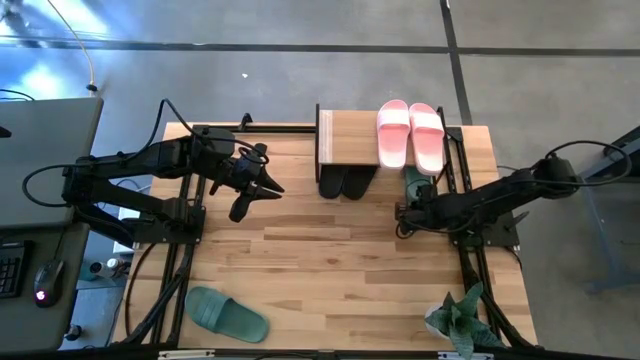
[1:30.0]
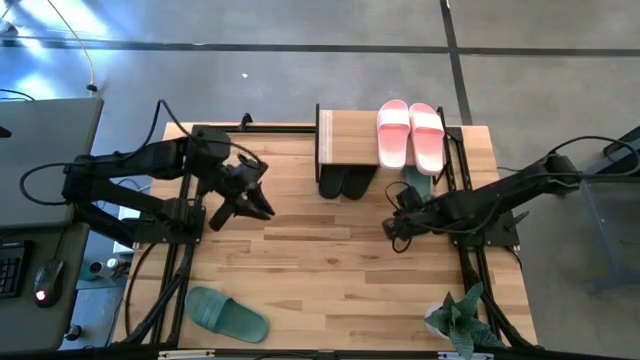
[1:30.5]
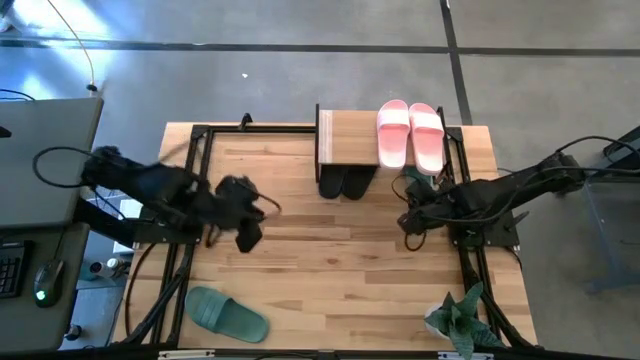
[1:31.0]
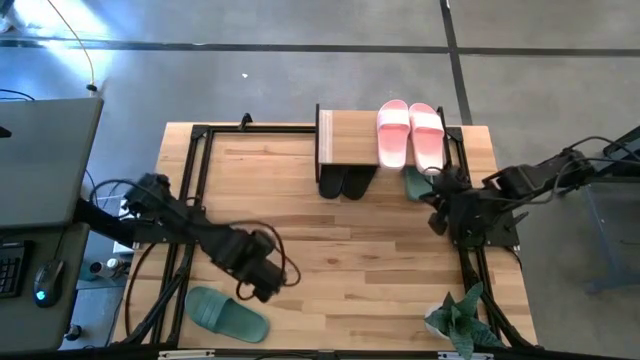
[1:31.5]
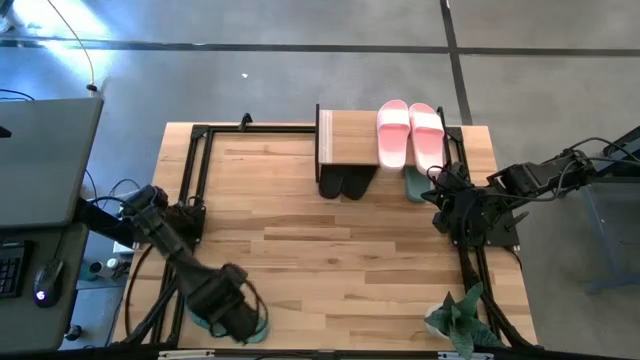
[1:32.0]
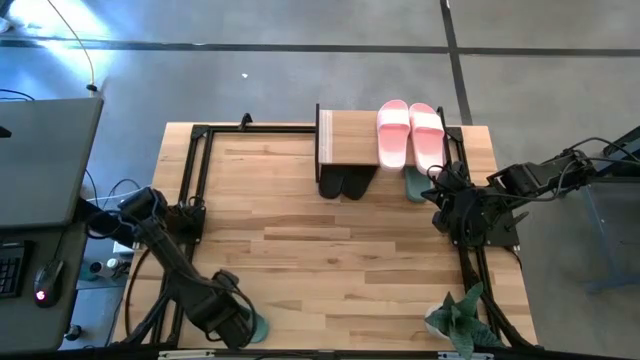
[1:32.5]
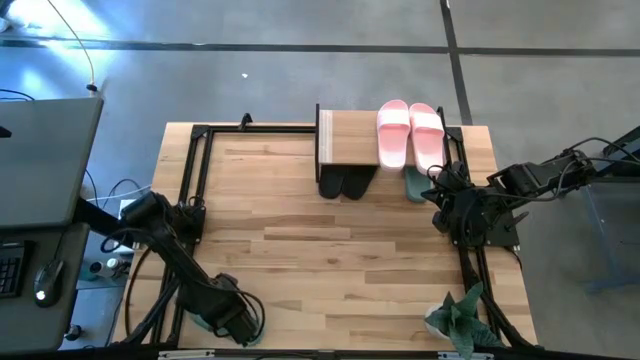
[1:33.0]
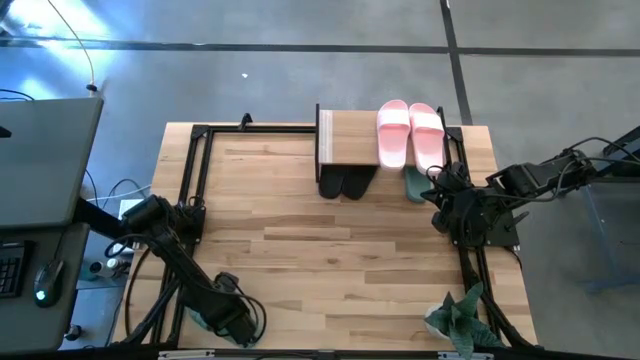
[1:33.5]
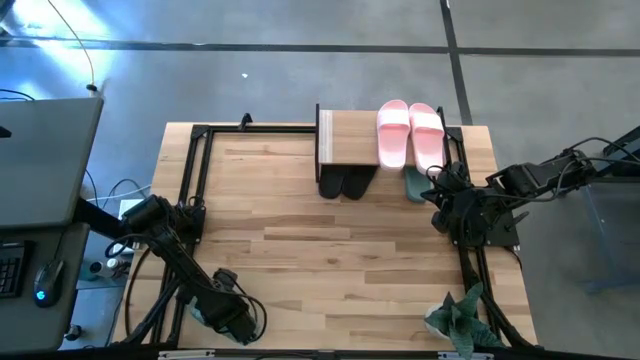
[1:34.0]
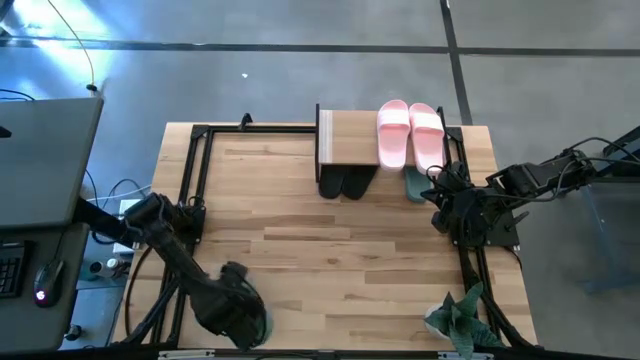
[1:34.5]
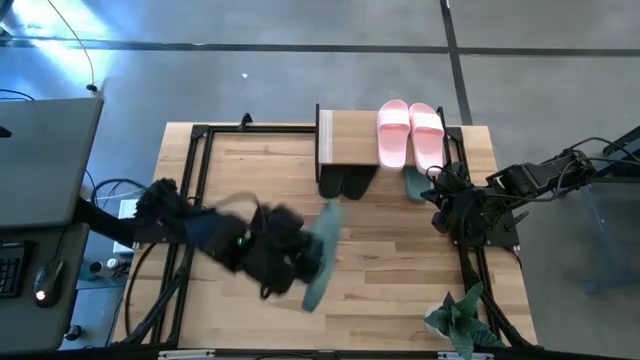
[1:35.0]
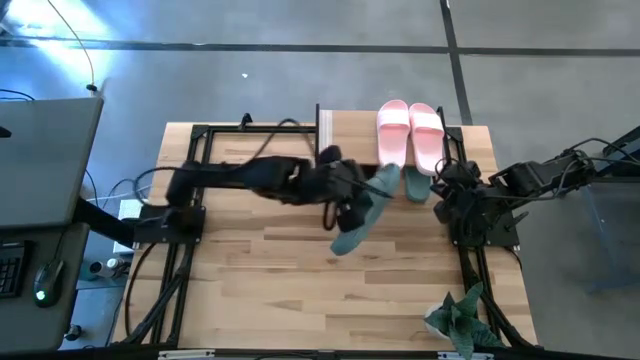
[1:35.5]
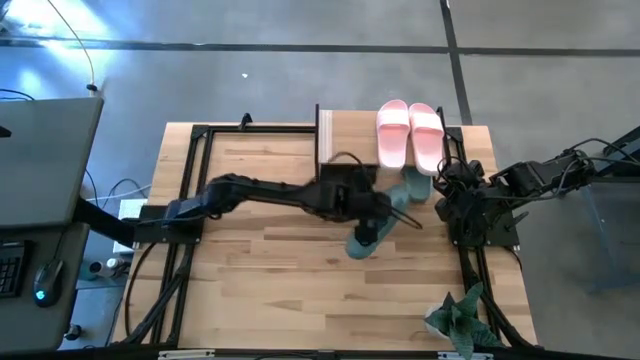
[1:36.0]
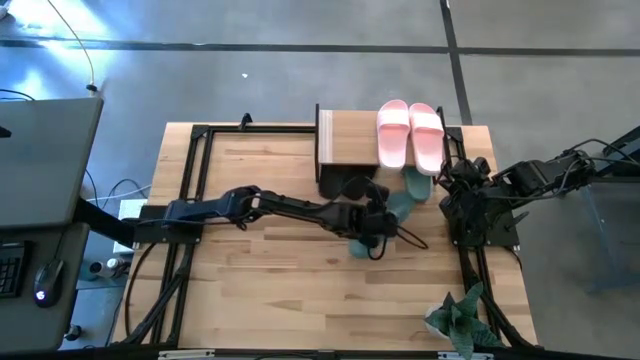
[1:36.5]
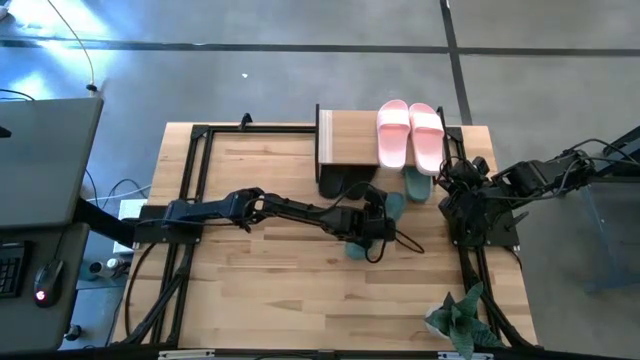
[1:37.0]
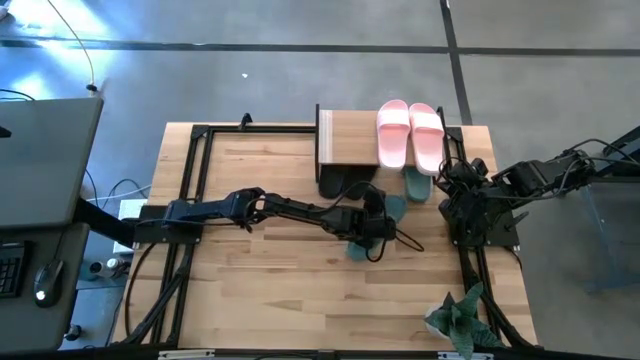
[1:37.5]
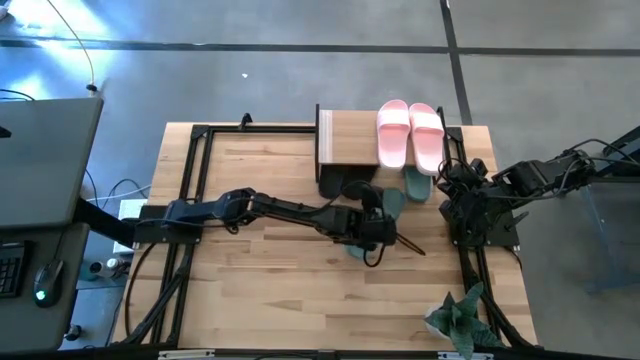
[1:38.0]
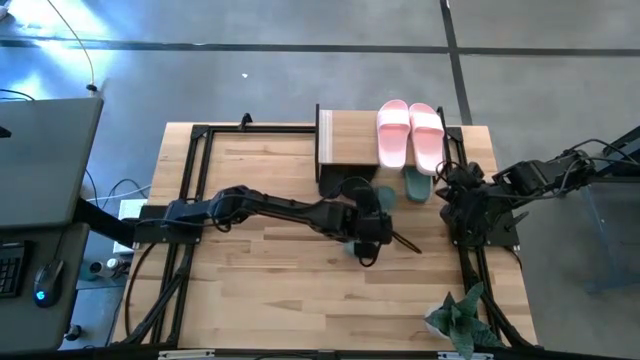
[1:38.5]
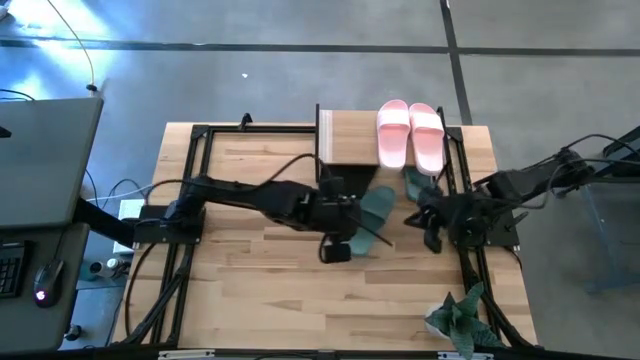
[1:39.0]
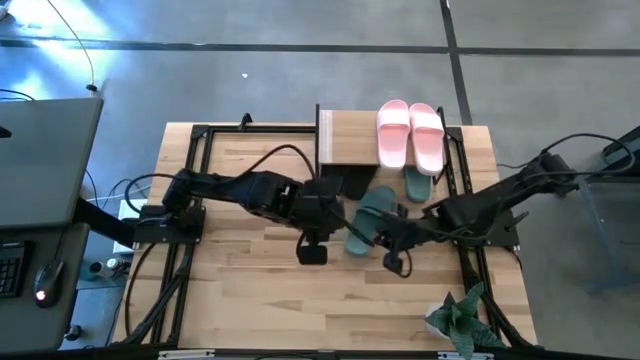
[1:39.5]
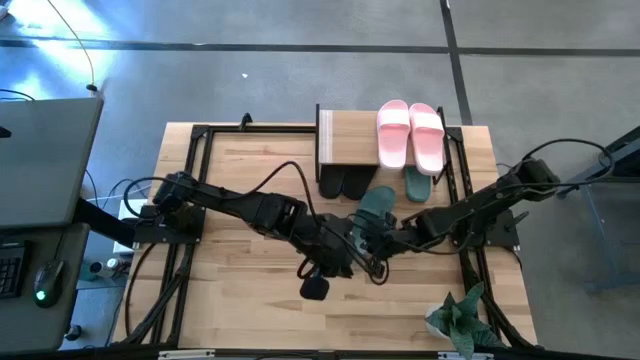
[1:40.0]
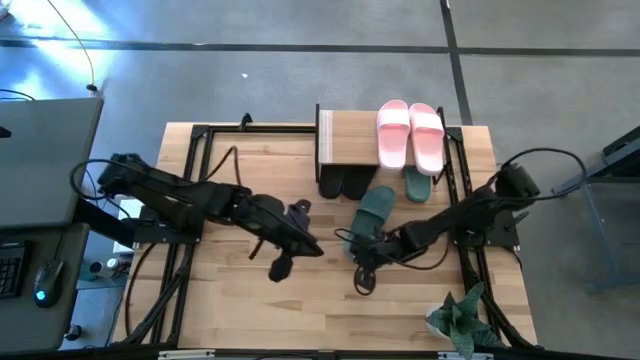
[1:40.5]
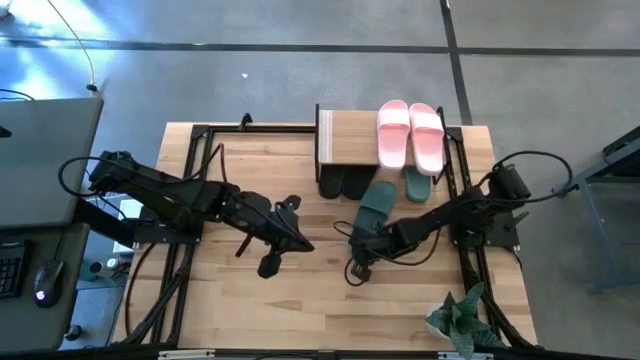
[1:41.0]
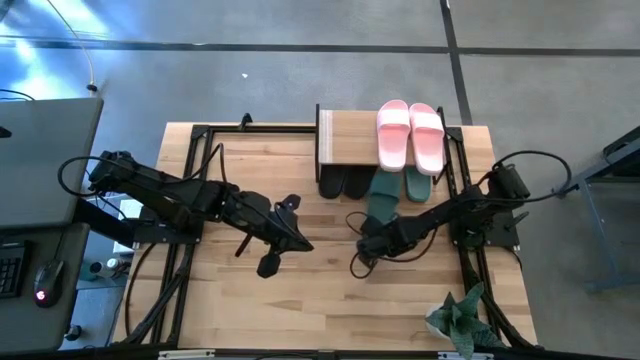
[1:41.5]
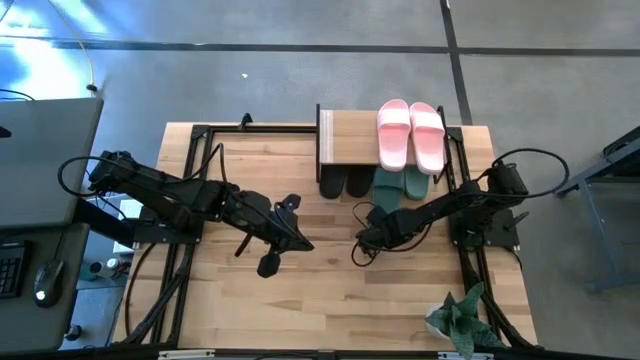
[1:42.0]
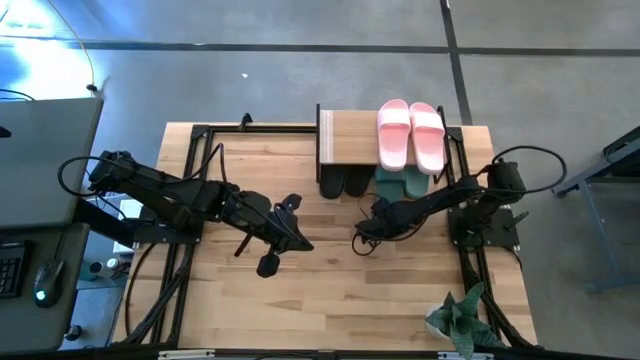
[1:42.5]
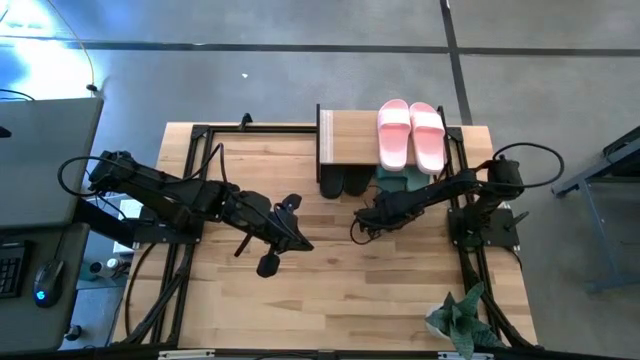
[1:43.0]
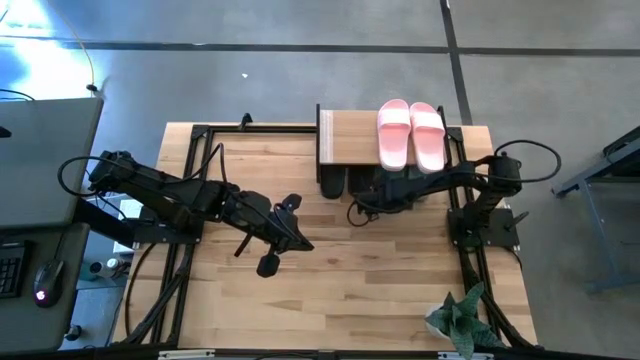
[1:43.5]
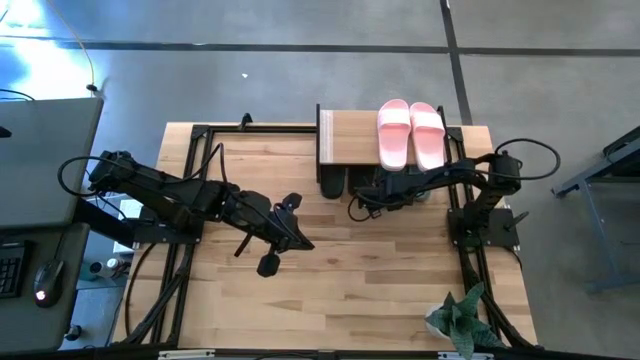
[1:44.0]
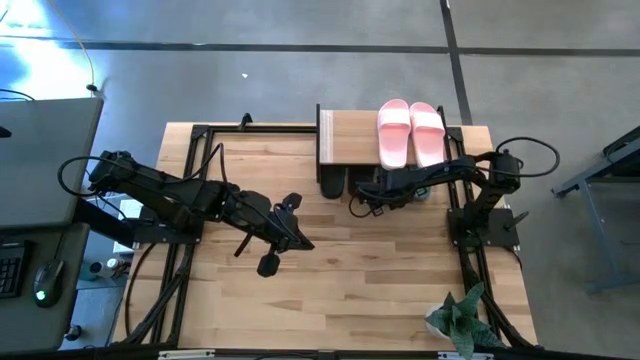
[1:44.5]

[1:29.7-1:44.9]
Task: Pick and place slides into the shelf
Put the green slide under the shelf

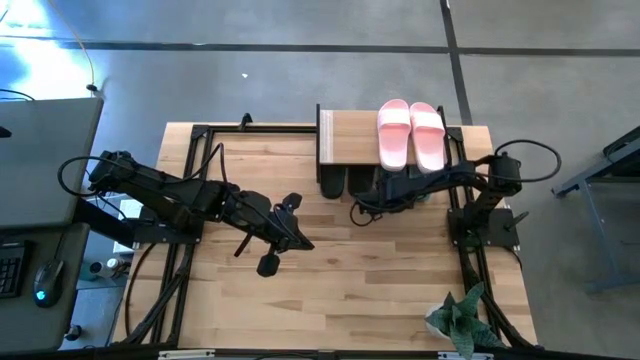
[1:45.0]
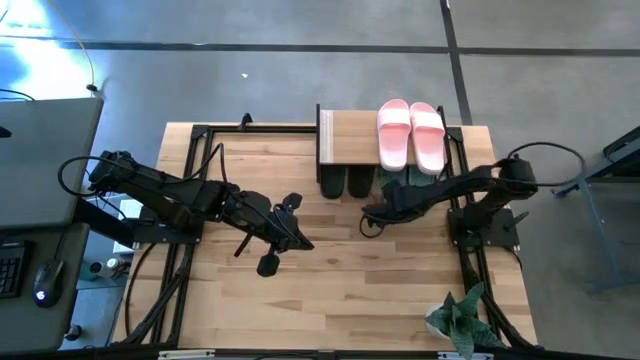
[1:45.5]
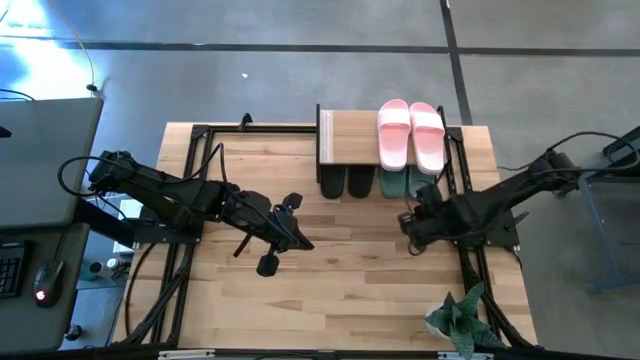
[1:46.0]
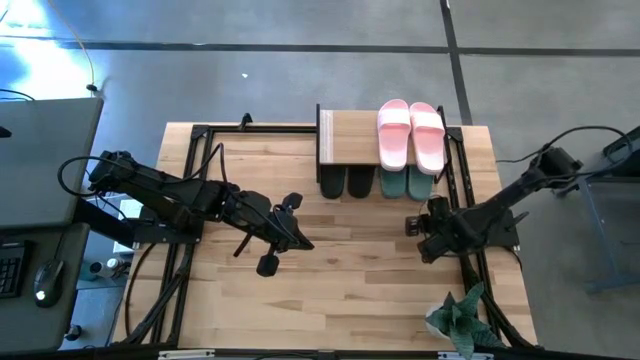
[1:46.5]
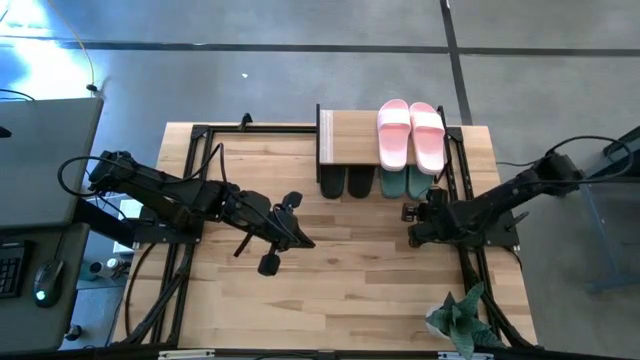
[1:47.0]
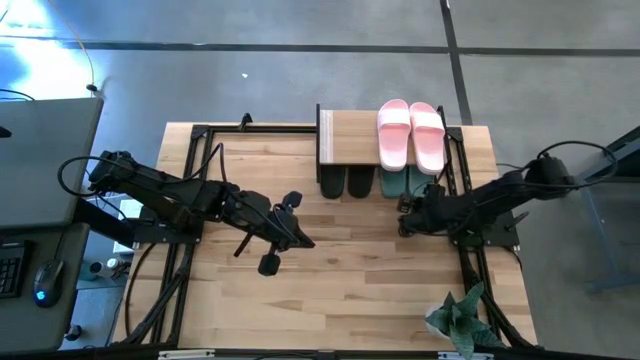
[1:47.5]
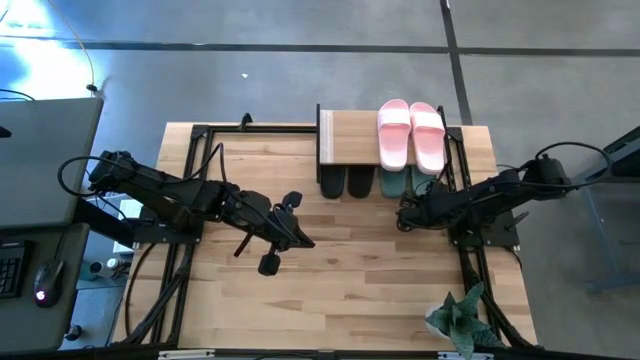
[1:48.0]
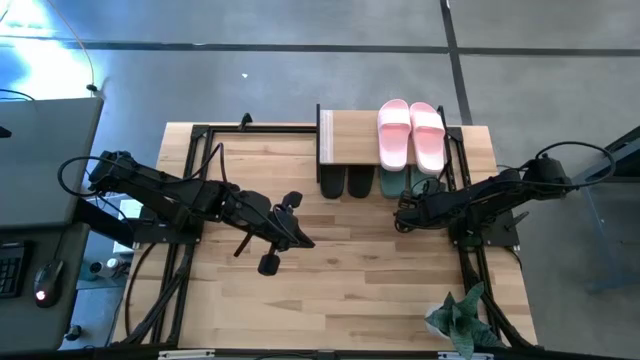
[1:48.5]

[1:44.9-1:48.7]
Adjust the right green slide

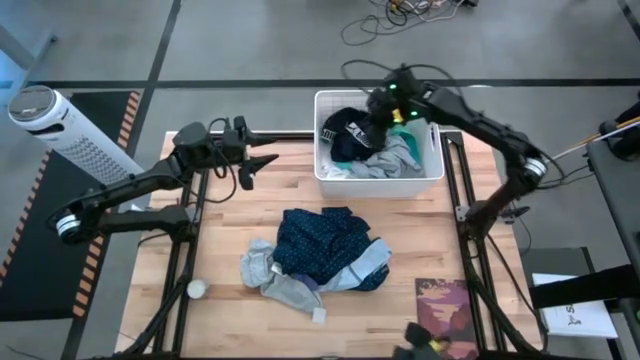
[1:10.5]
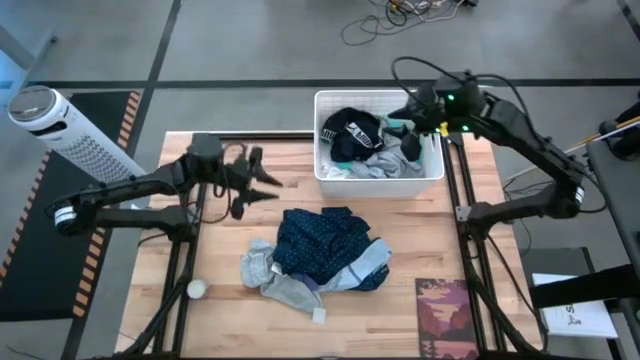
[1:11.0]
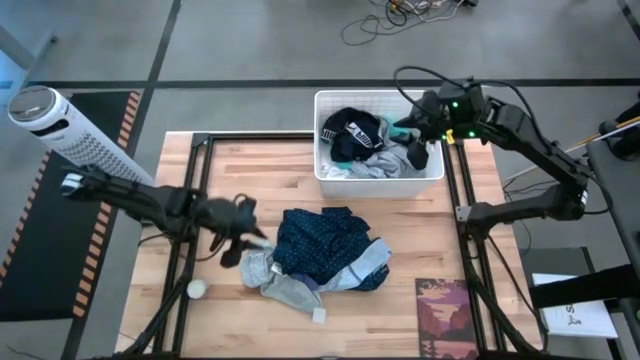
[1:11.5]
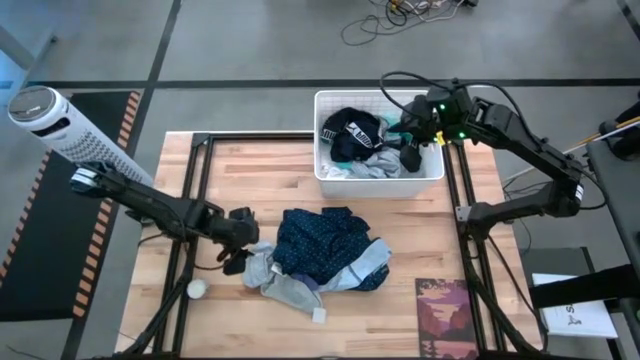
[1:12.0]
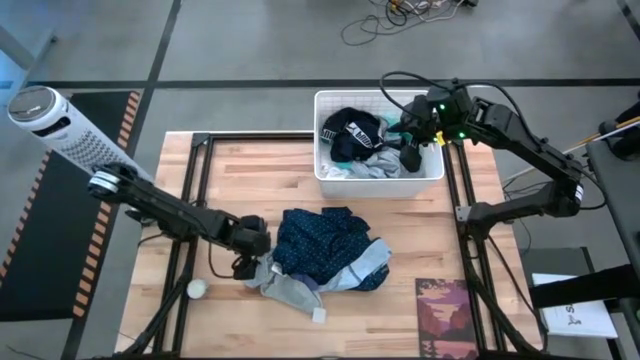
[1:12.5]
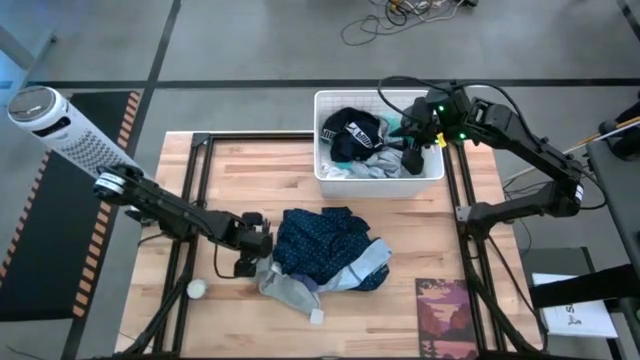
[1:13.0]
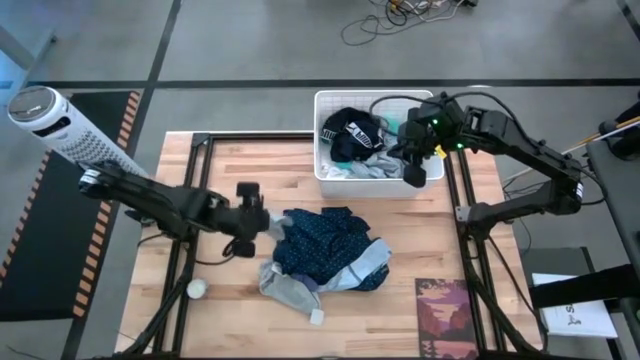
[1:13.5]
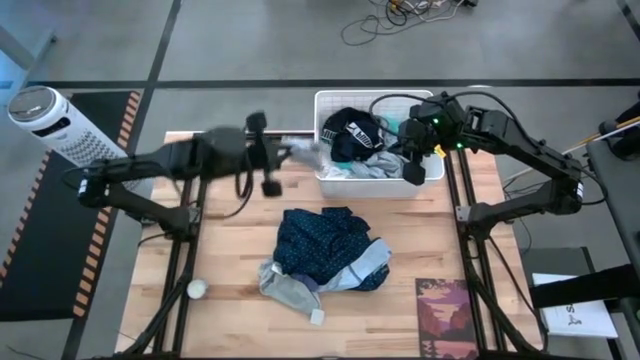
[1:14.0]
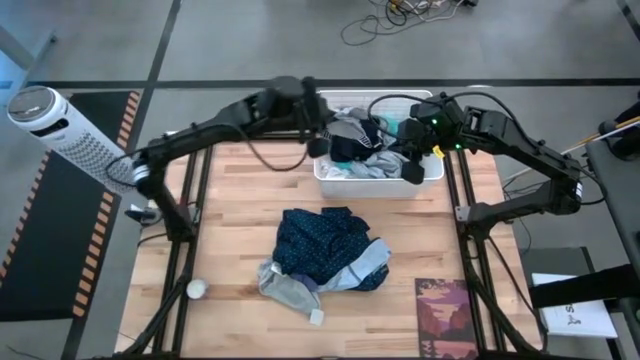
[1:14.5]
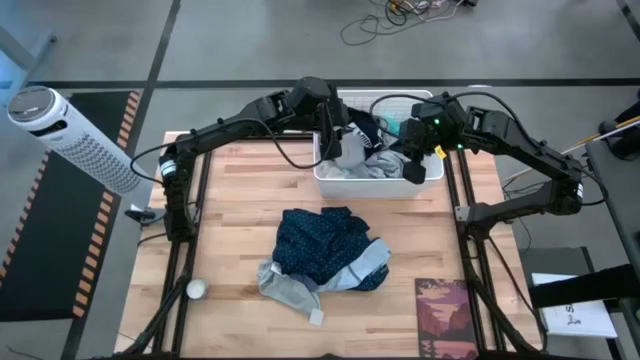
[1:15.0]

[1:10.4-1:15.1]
Task: Sort clothes
Put the gray sock into the white laundry bin
